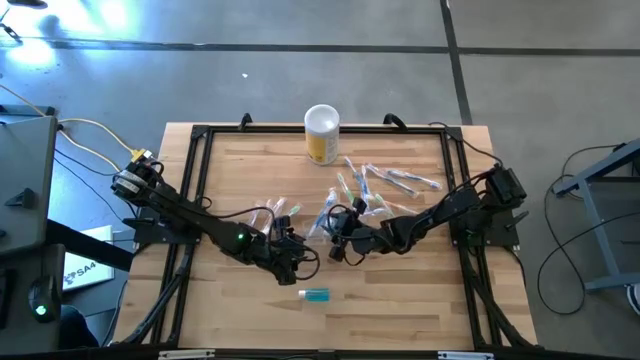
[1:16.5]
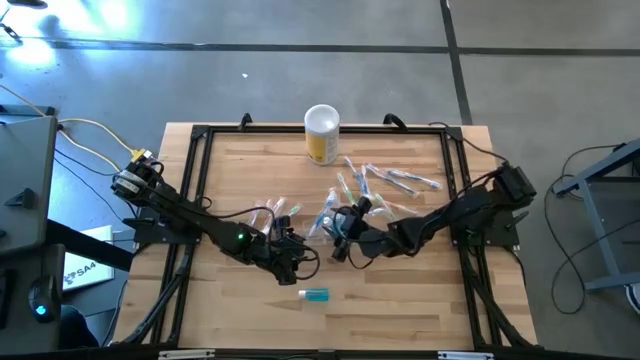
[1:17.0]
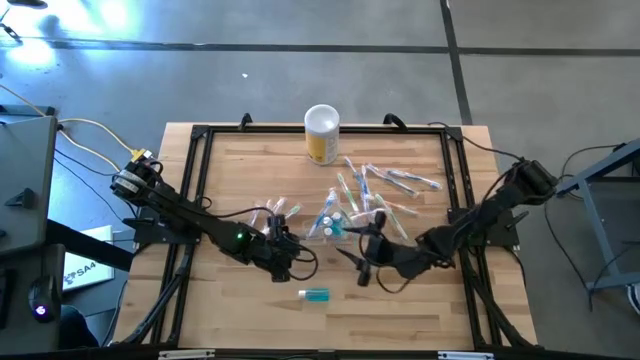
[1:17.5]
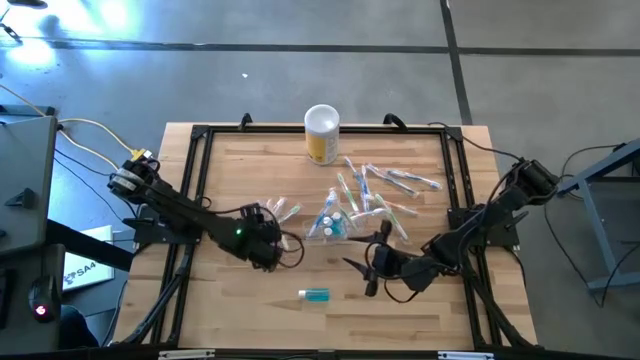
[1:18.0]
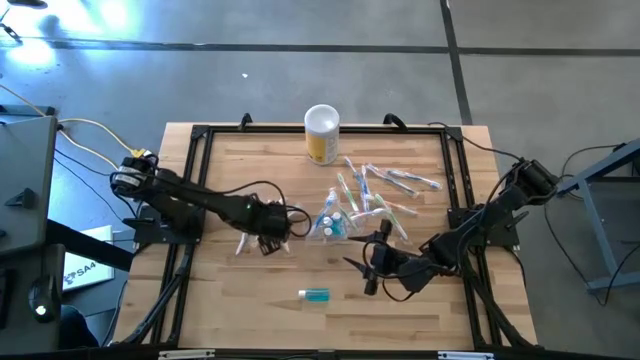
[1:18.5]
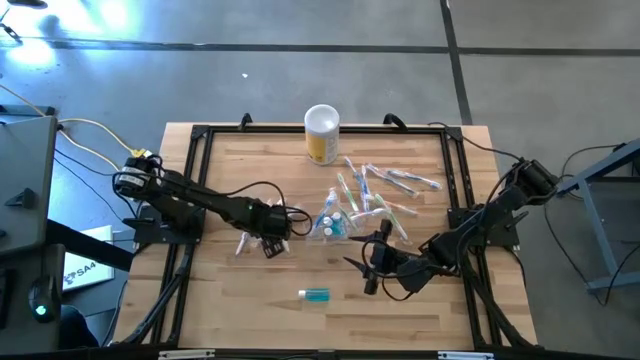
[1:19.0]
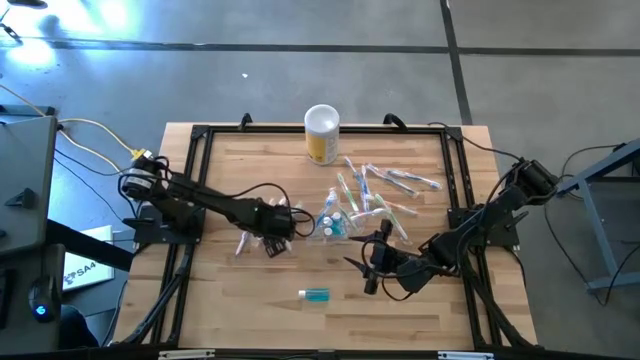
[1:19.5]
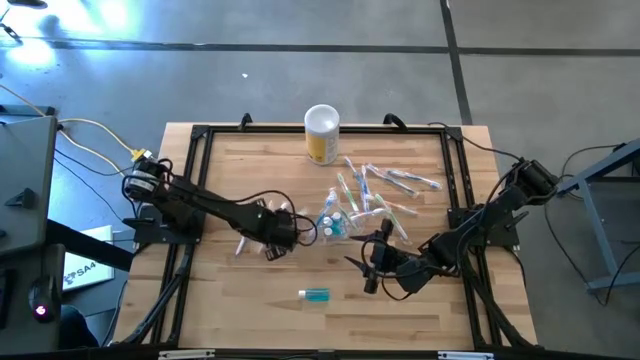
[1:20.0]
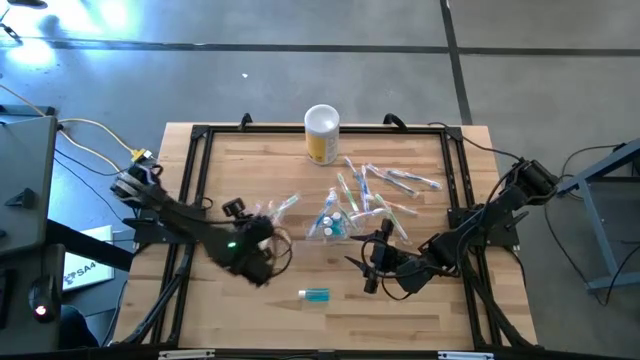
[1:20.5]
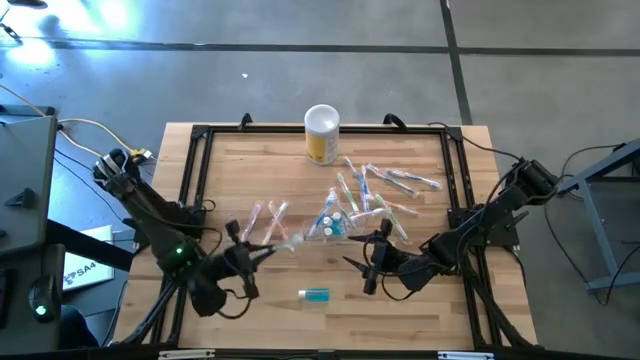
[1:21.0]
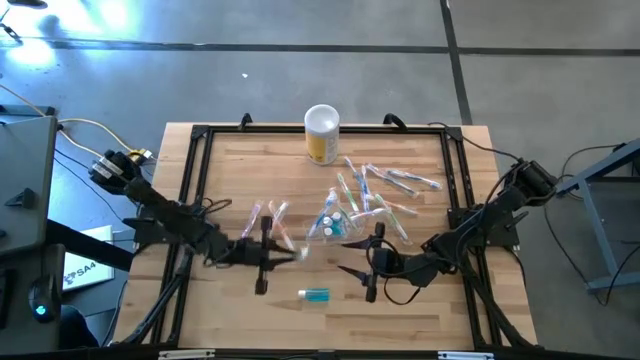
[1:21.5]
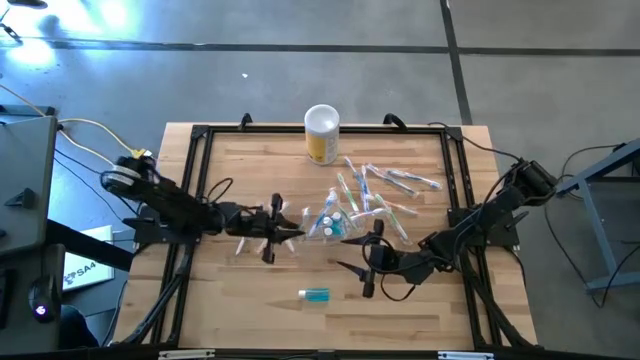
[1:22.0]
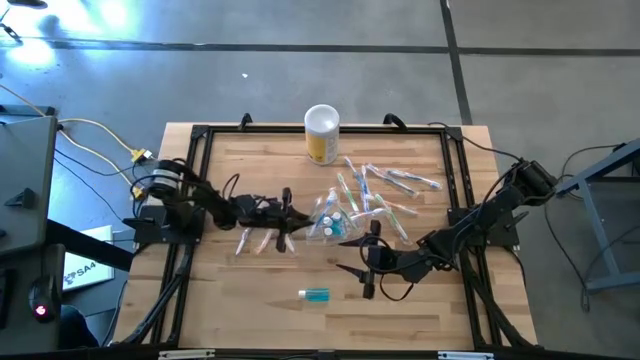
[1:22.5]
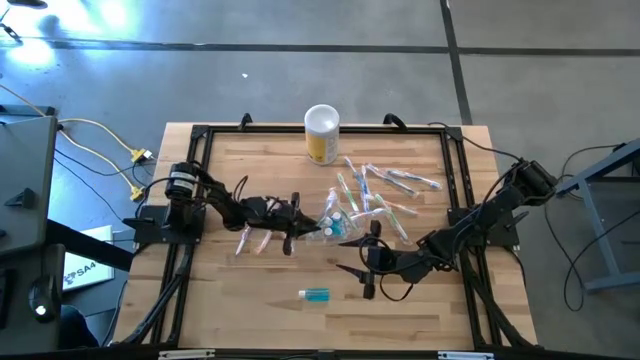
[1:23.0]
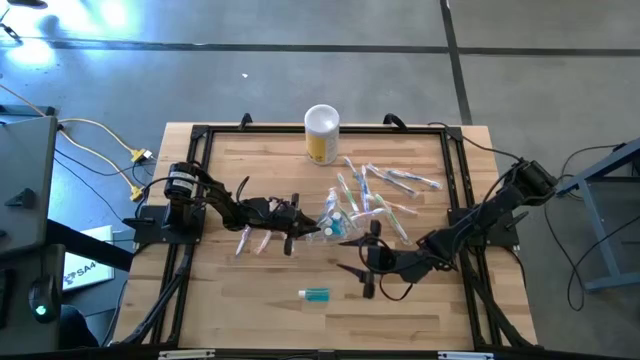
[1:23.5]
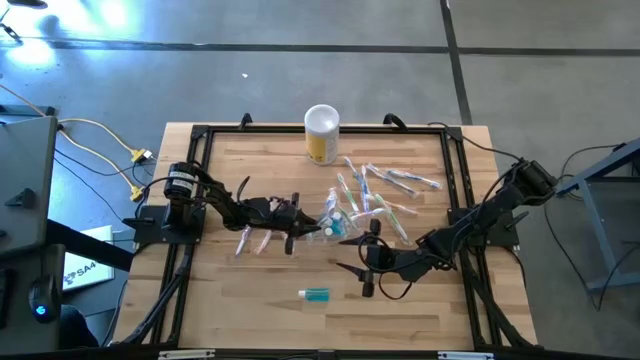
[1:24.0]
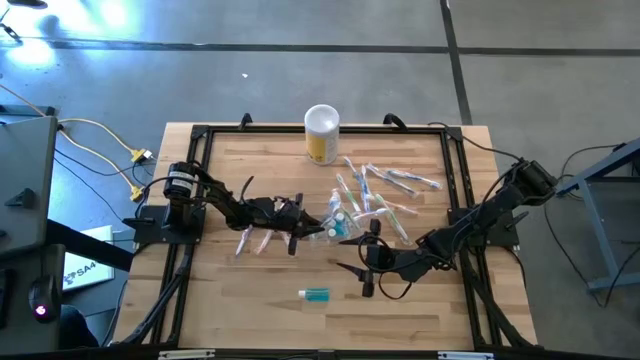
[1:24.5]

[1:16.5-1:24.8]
Task: Pick & Place toothbrushing station
Put the green toothbrush in the transparent organizer

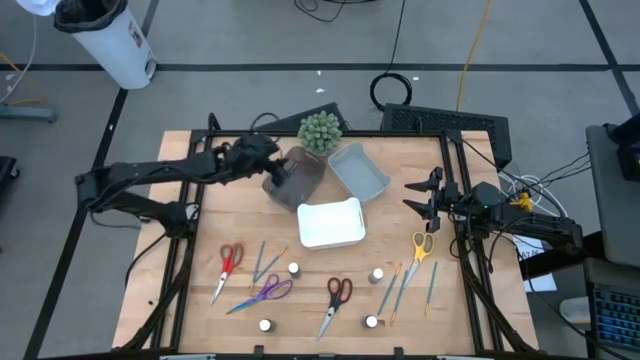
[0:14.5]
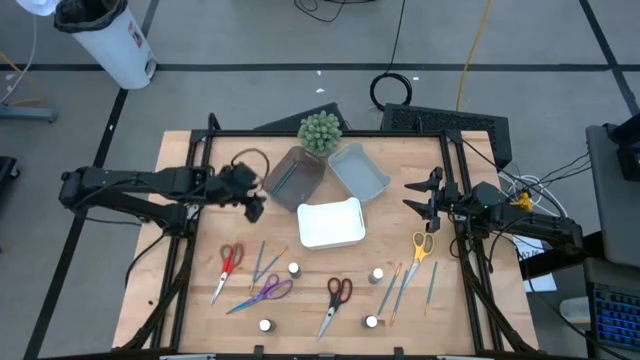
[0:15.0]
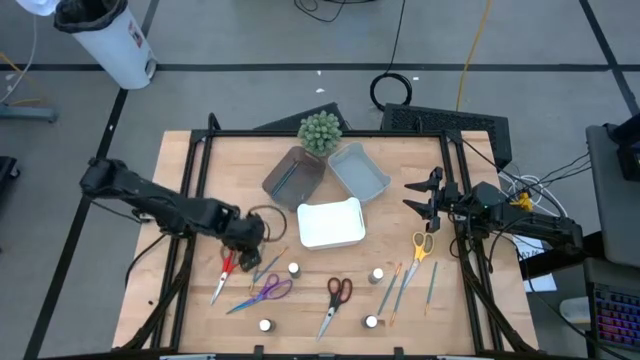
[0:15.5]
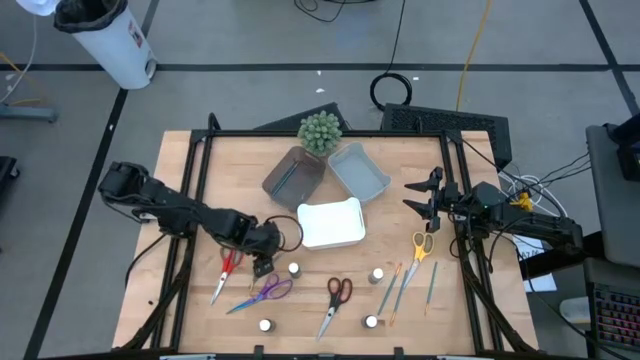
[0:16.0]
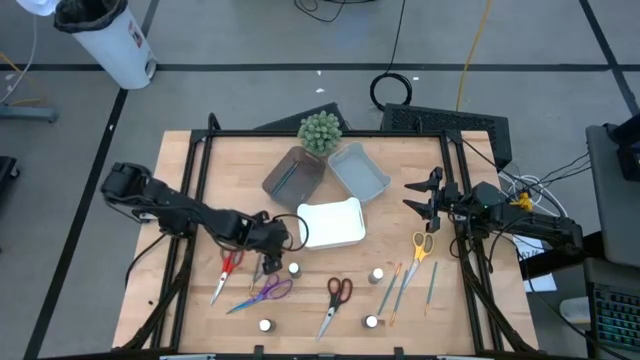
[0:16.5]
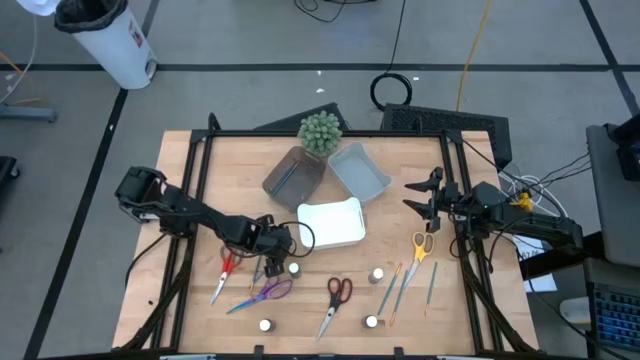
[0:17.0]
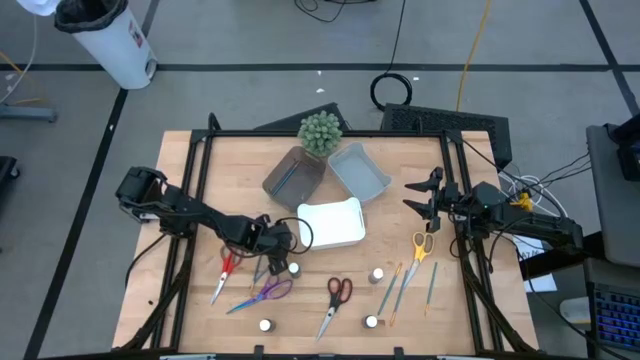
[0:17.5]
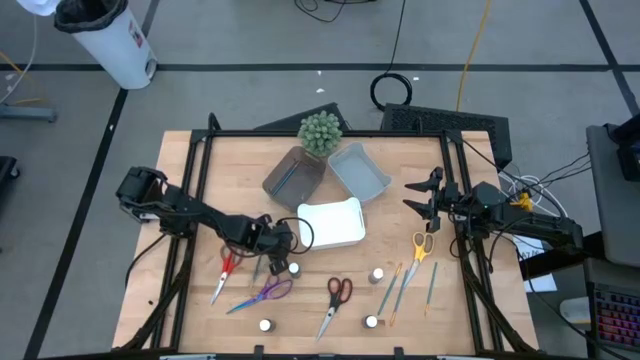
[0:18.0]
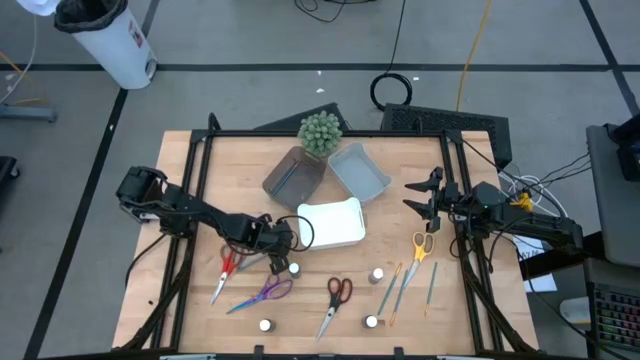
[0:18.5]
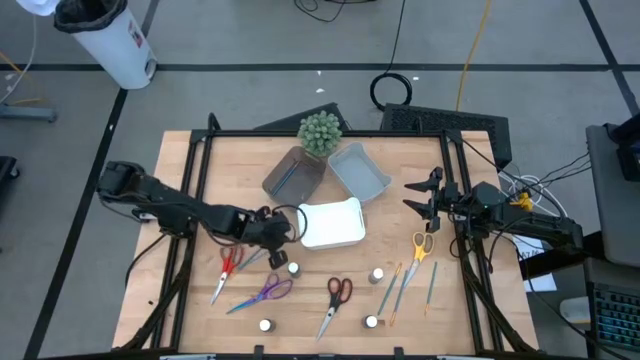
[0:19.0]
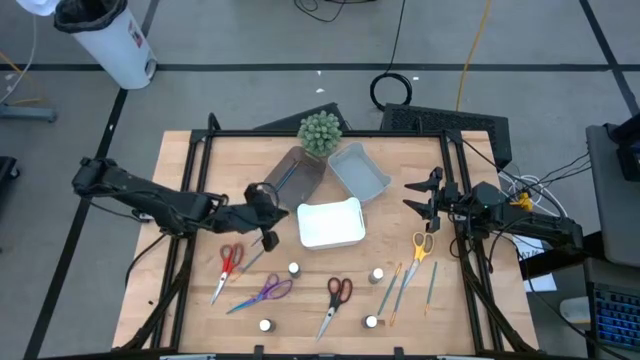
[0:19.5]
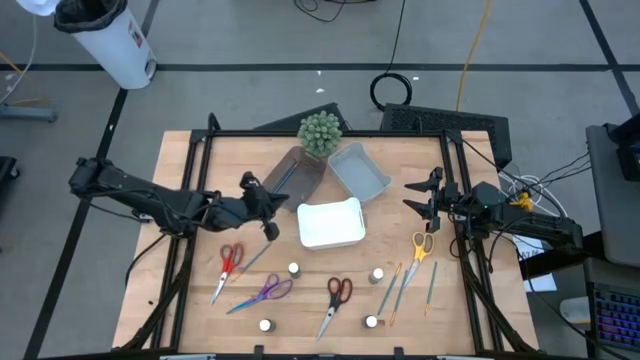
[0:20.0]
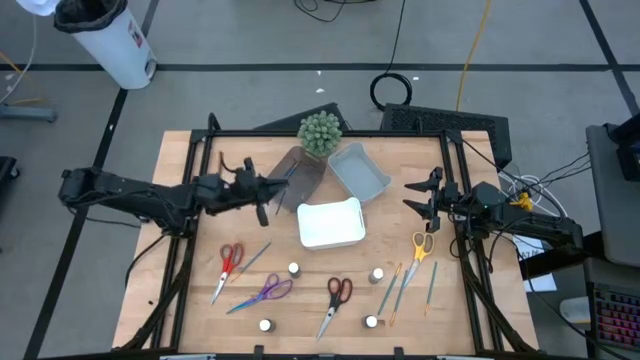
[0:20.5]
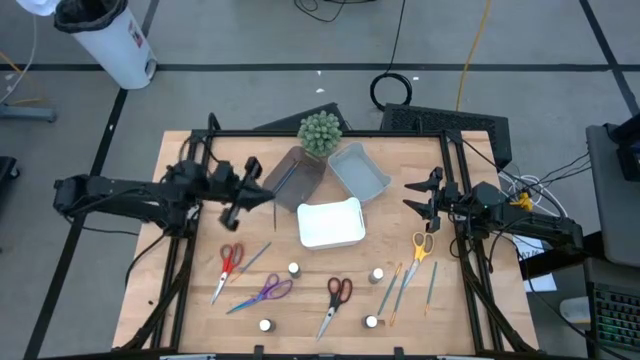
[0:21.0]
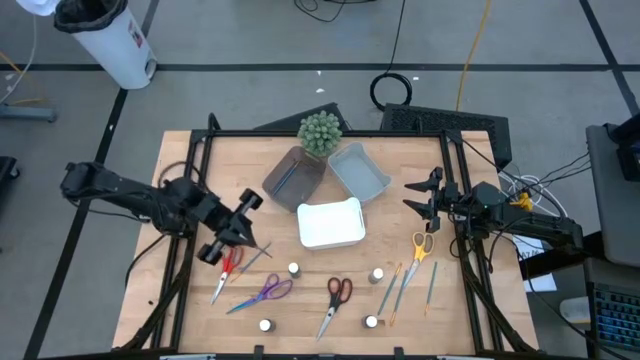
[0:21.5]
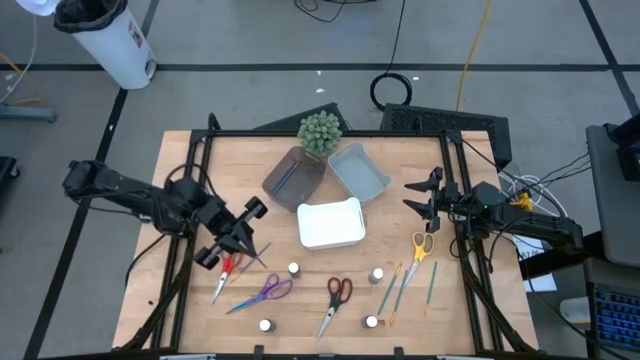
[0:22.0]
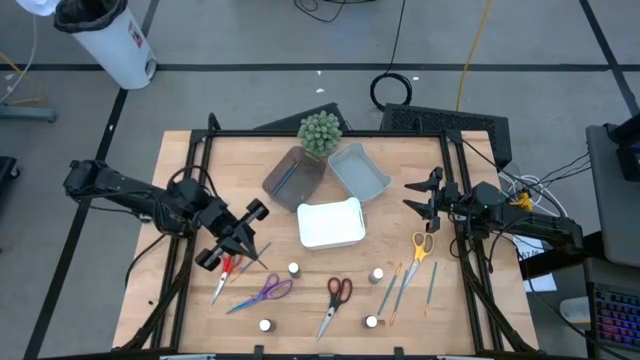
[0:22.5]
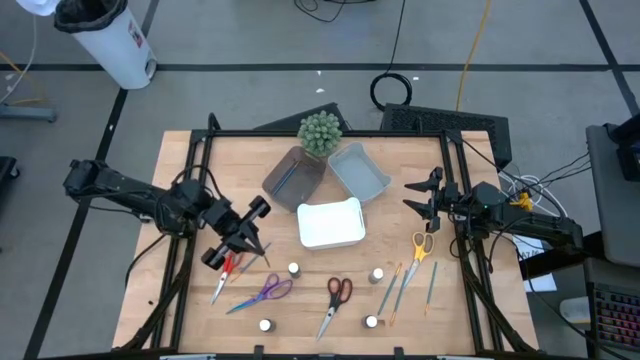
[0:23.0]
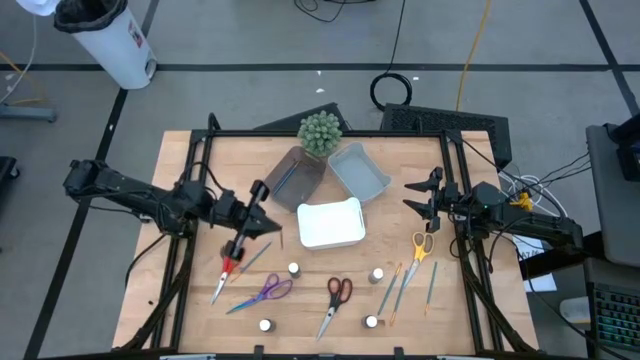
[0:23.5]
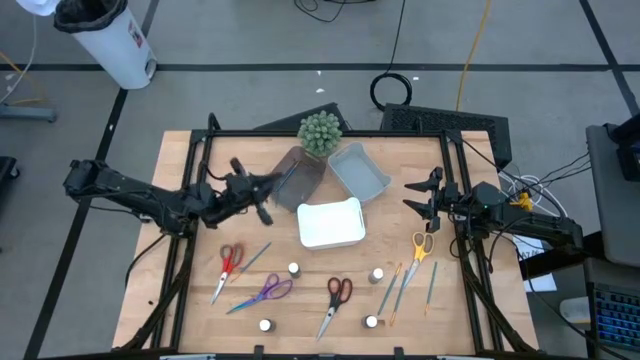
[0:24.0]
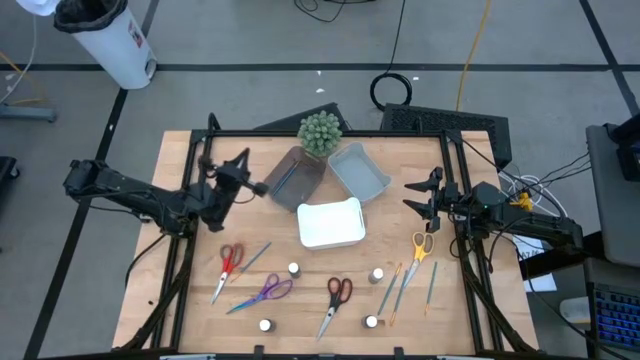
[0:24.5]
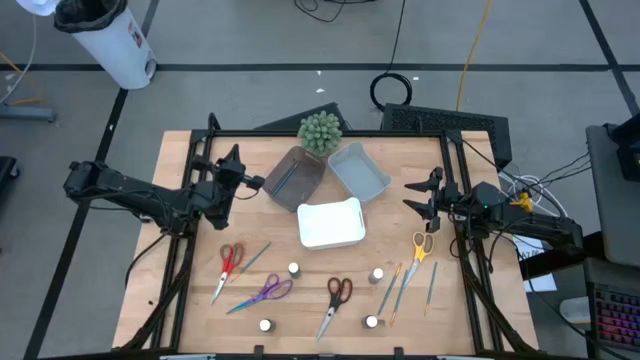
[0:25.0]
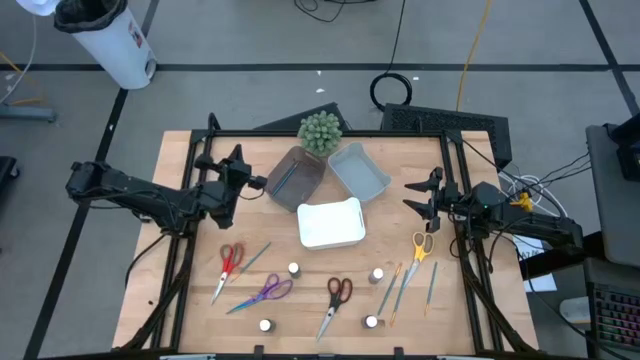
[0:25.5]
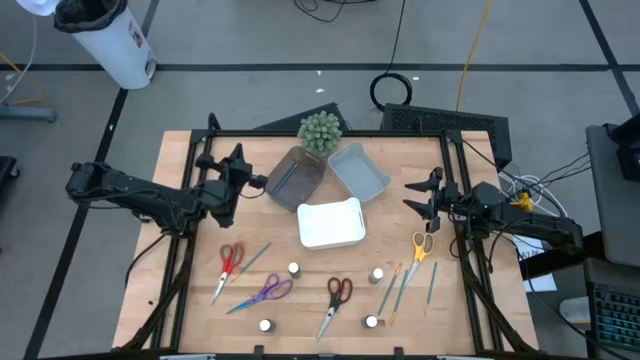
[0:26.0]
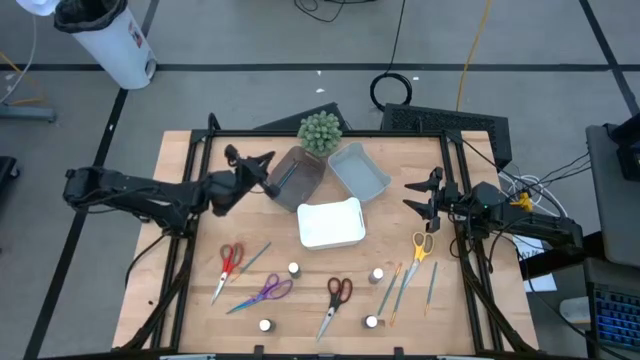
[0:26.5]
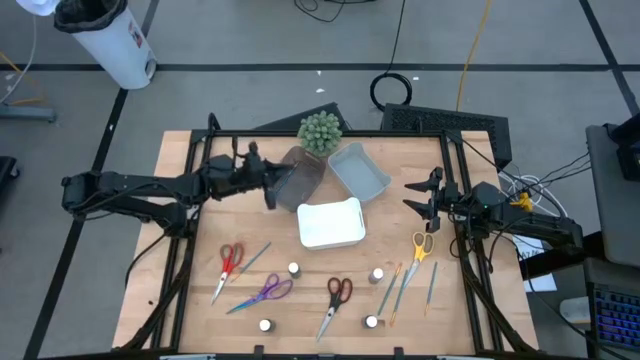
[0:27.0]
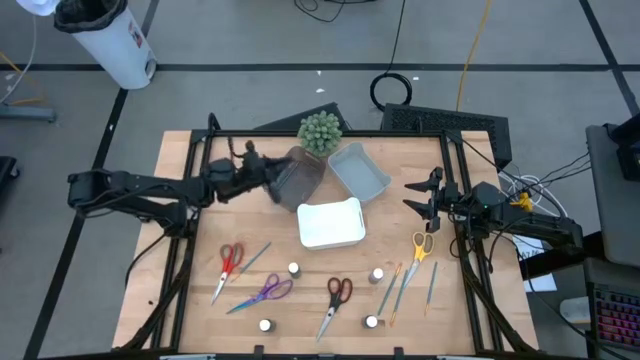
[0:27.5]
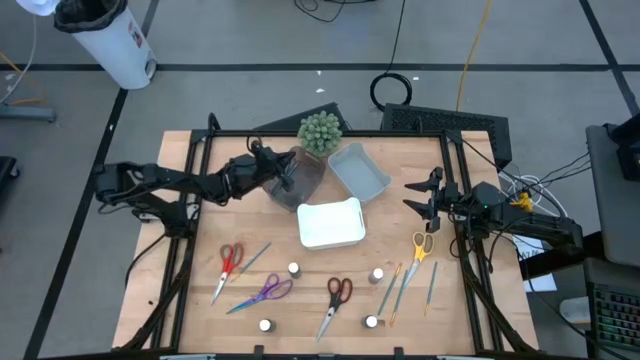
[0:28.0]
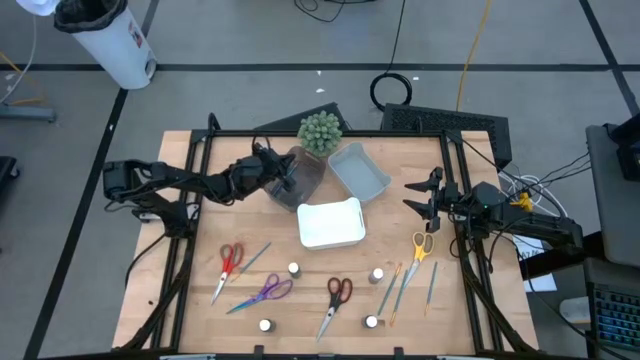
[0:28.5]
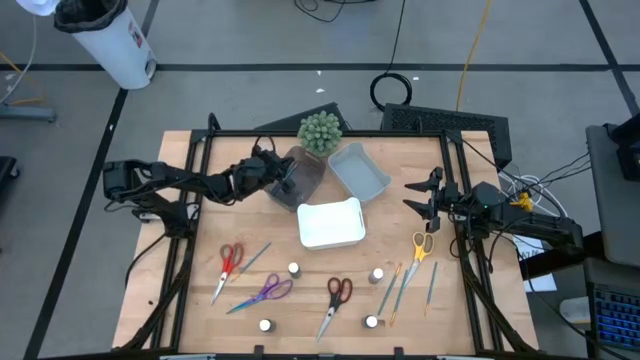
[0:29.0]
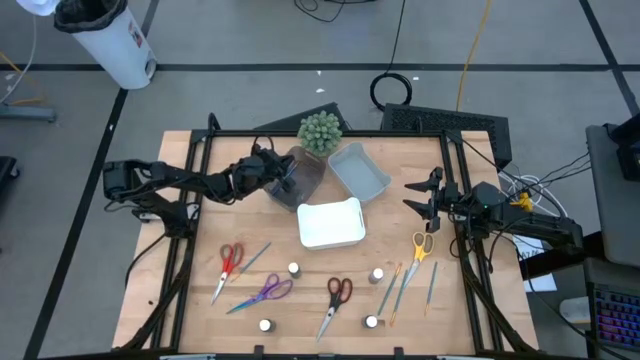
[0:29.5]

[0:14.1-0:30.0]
Task: Pick & Place Paint Supplies
Put the blue paint brush into the black bin
